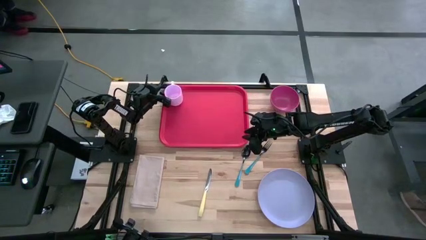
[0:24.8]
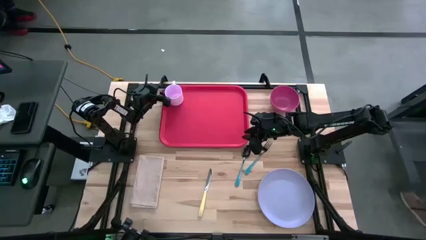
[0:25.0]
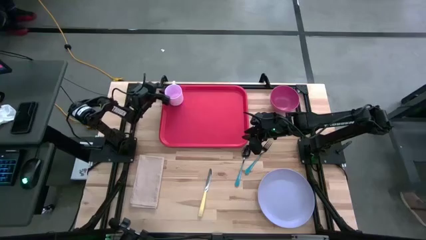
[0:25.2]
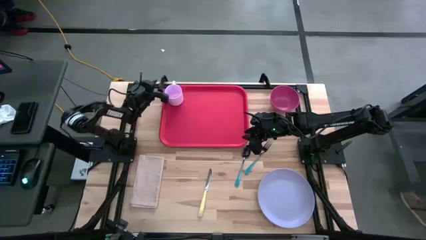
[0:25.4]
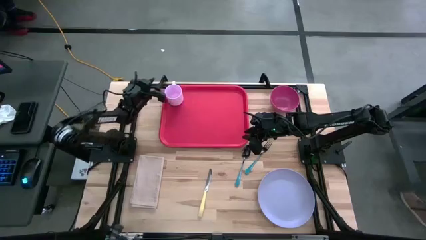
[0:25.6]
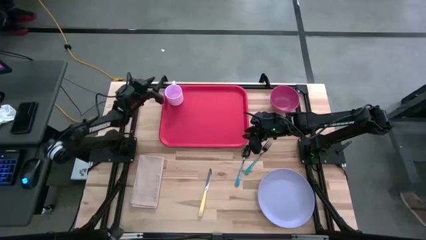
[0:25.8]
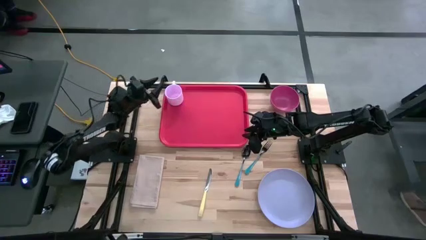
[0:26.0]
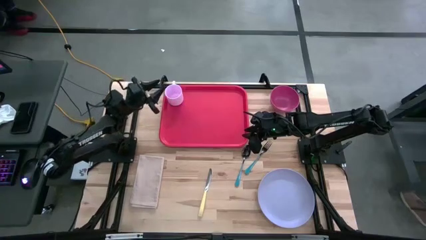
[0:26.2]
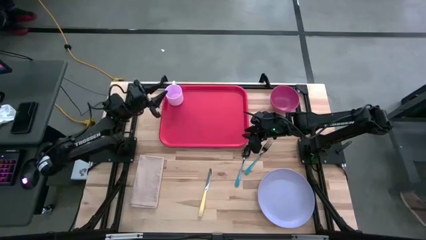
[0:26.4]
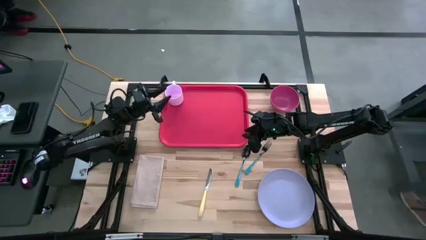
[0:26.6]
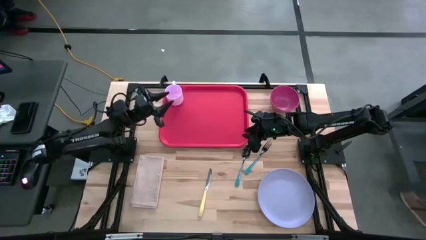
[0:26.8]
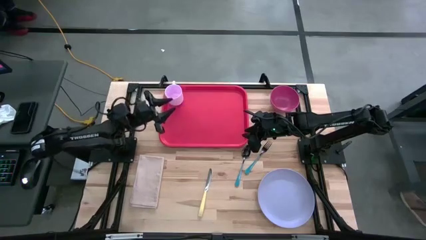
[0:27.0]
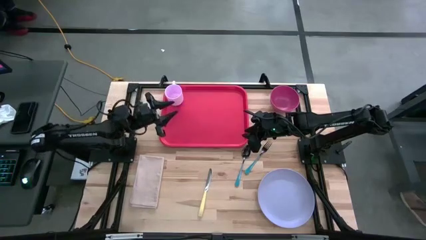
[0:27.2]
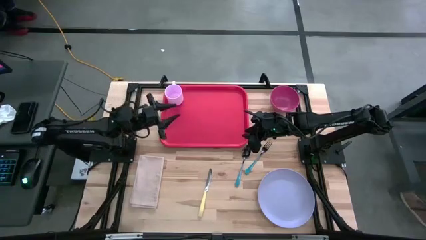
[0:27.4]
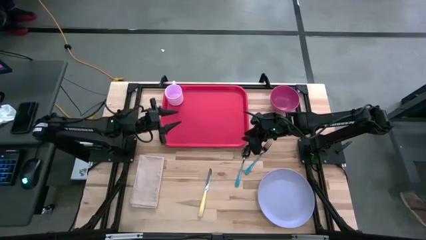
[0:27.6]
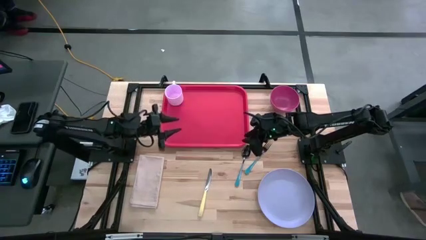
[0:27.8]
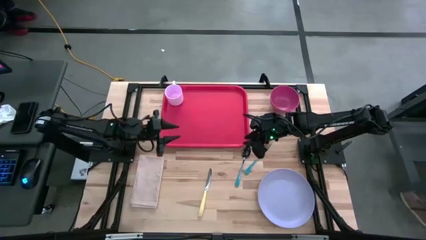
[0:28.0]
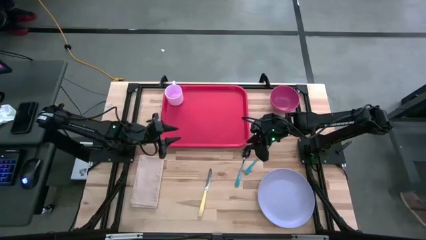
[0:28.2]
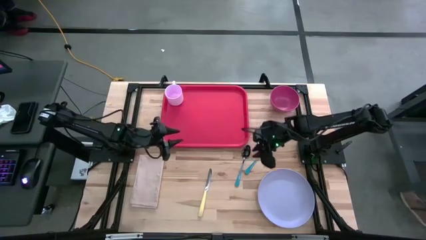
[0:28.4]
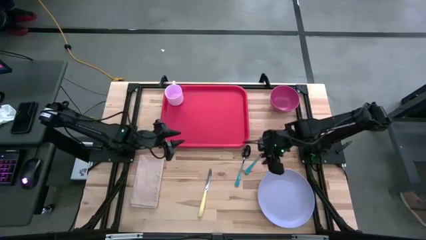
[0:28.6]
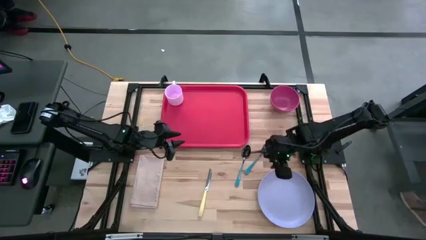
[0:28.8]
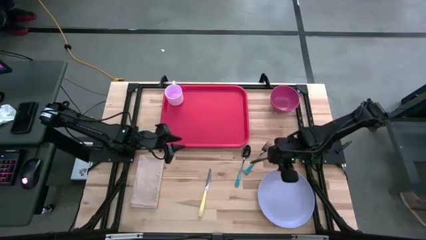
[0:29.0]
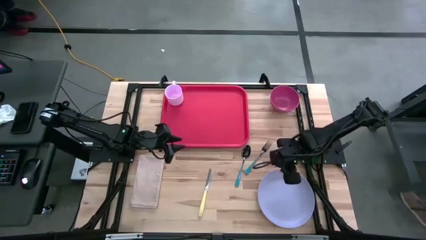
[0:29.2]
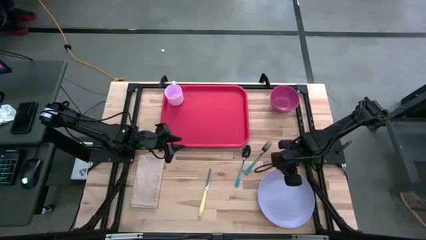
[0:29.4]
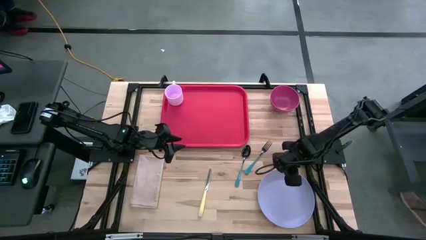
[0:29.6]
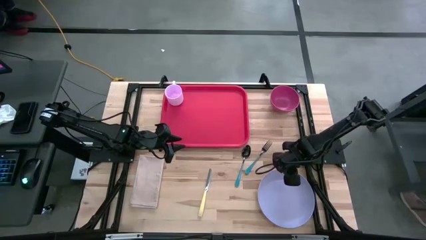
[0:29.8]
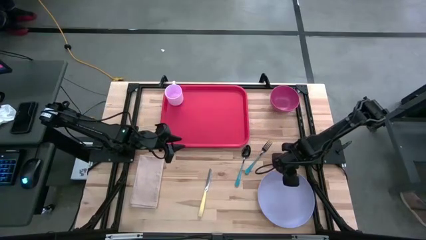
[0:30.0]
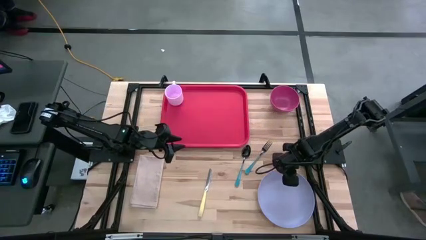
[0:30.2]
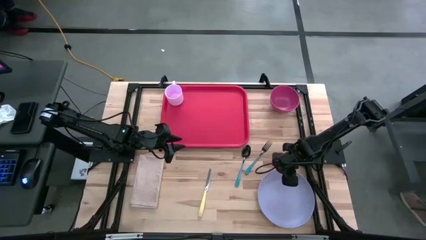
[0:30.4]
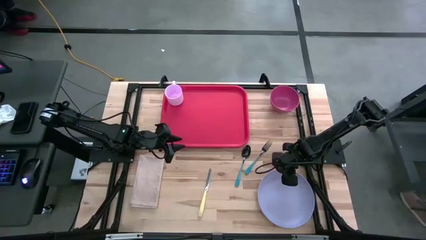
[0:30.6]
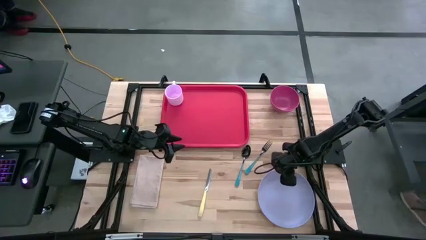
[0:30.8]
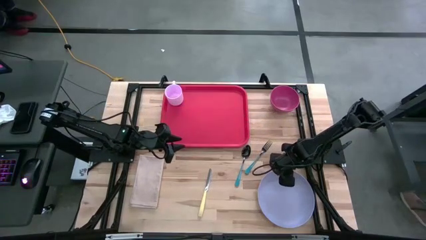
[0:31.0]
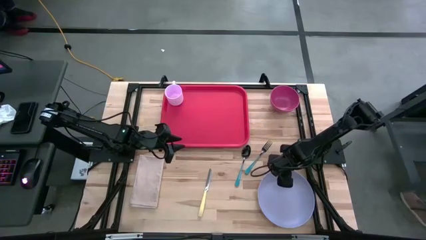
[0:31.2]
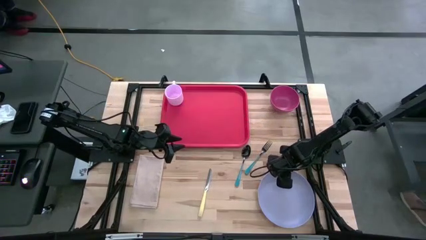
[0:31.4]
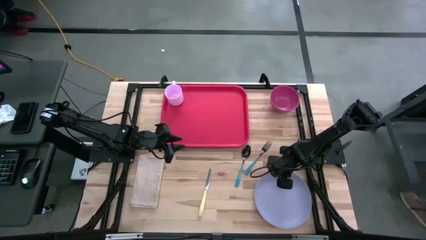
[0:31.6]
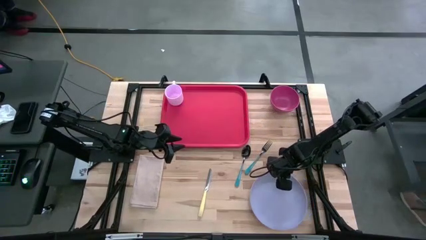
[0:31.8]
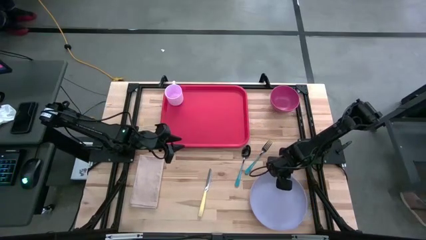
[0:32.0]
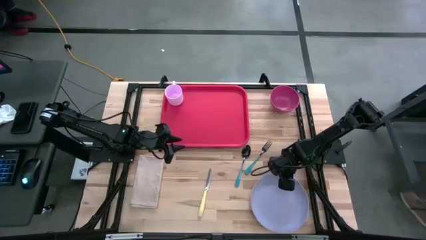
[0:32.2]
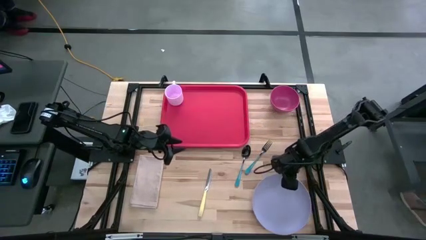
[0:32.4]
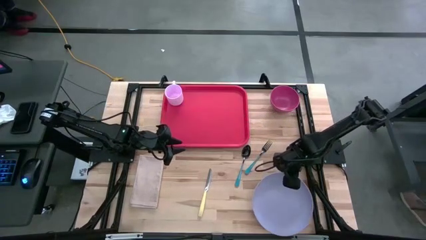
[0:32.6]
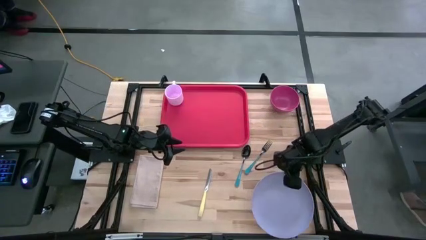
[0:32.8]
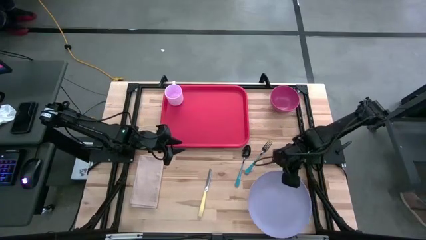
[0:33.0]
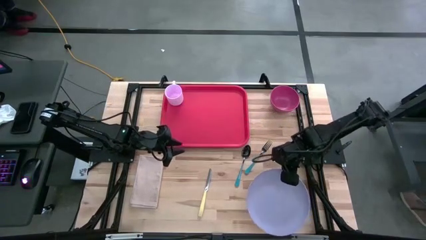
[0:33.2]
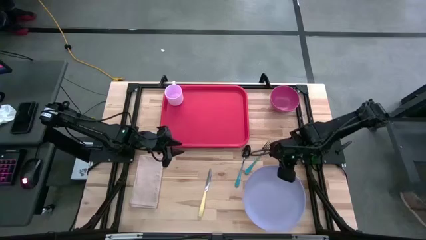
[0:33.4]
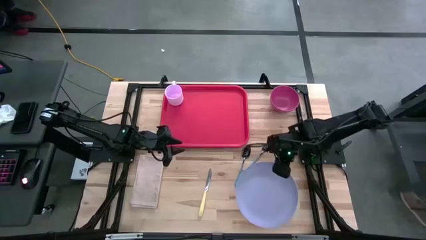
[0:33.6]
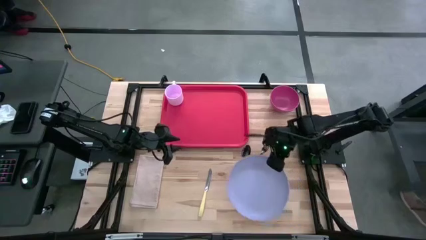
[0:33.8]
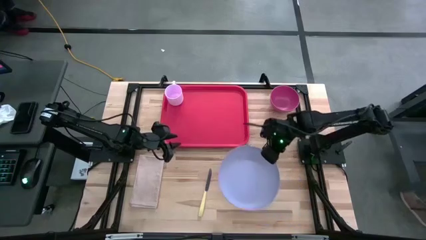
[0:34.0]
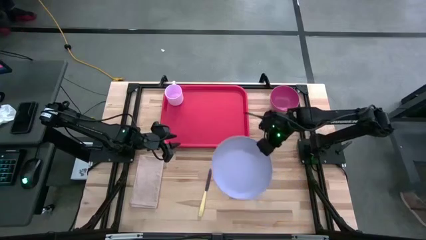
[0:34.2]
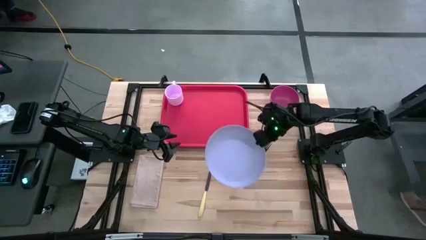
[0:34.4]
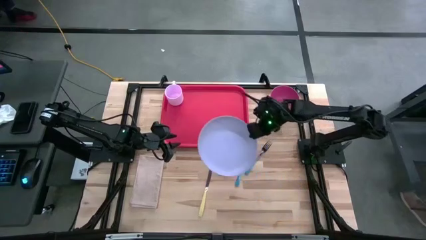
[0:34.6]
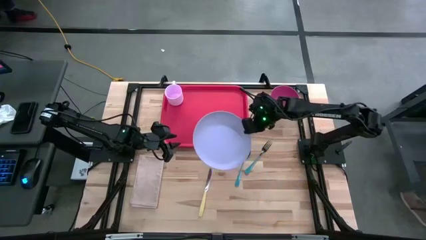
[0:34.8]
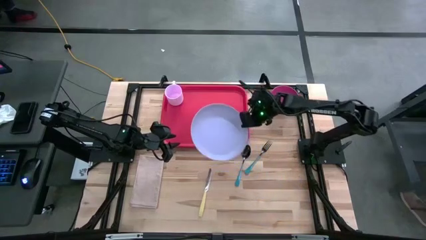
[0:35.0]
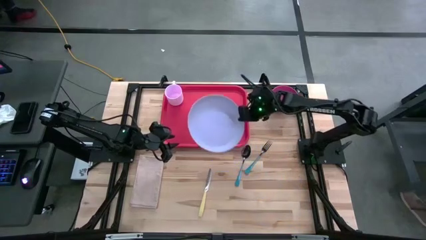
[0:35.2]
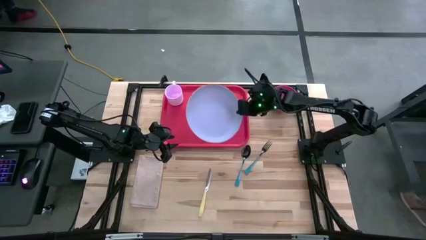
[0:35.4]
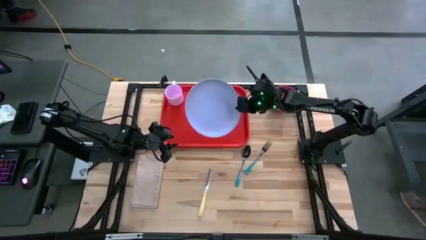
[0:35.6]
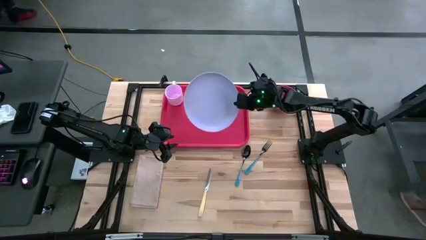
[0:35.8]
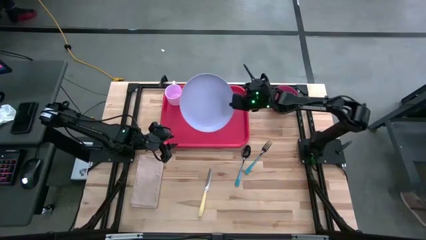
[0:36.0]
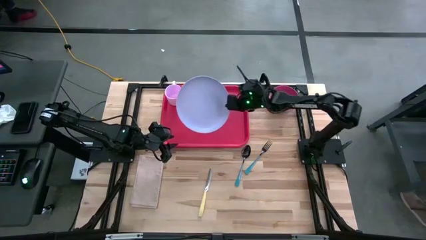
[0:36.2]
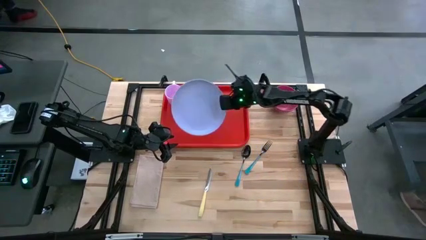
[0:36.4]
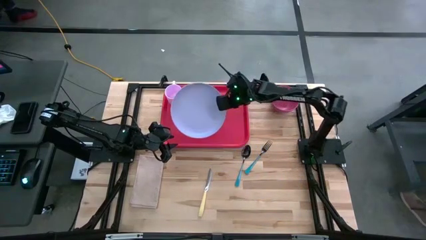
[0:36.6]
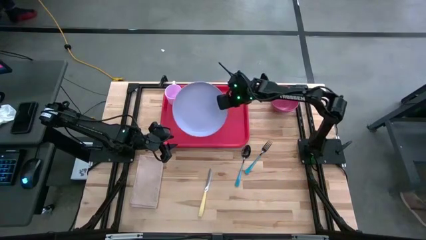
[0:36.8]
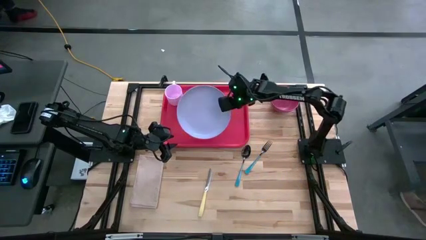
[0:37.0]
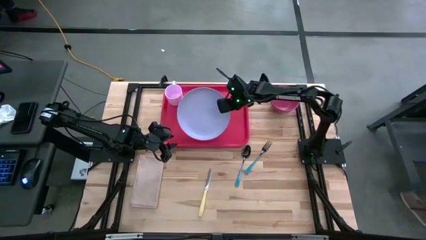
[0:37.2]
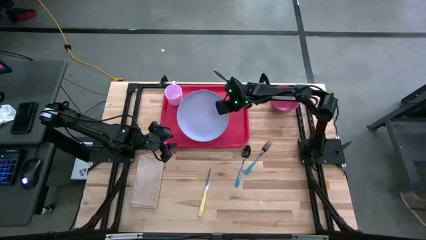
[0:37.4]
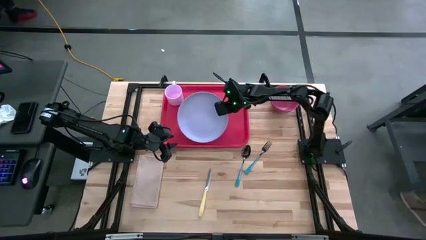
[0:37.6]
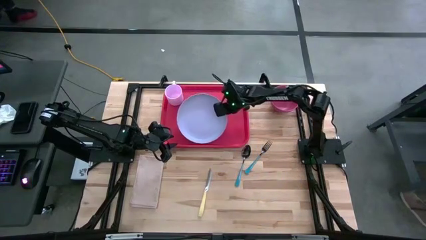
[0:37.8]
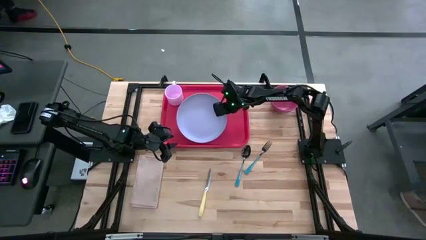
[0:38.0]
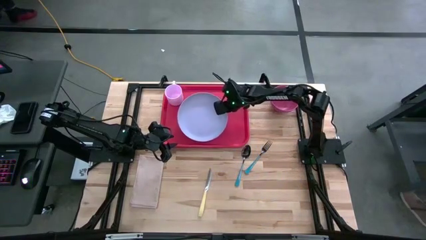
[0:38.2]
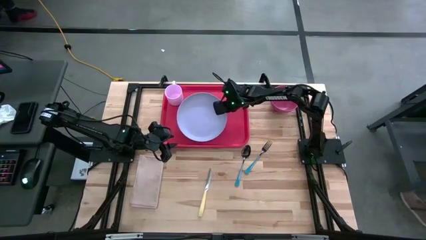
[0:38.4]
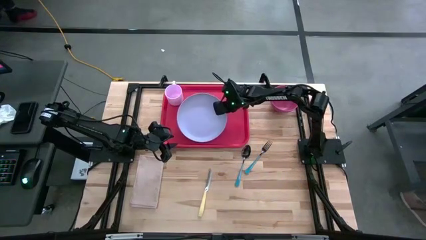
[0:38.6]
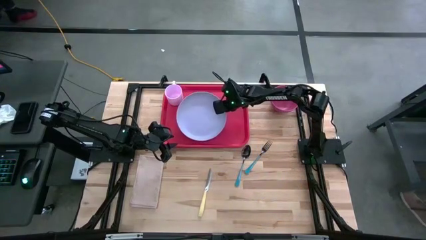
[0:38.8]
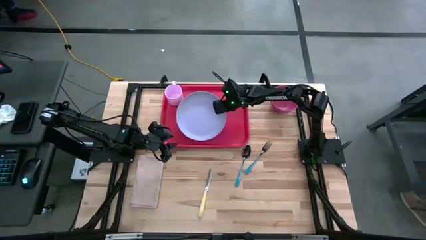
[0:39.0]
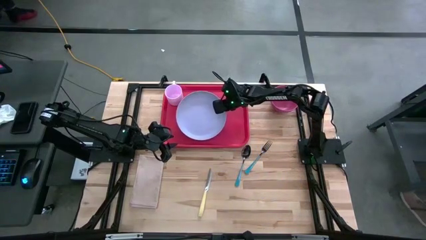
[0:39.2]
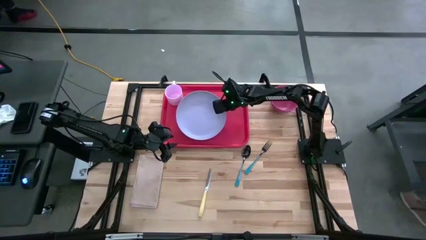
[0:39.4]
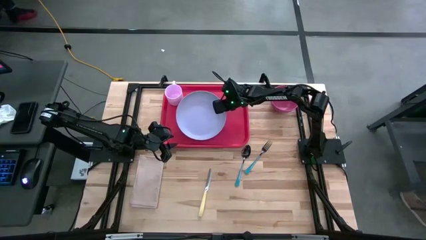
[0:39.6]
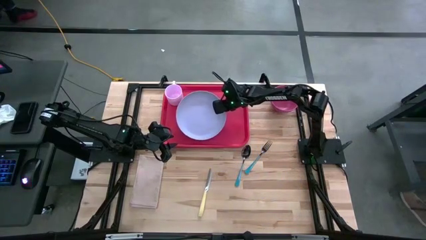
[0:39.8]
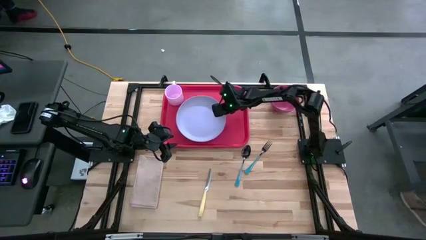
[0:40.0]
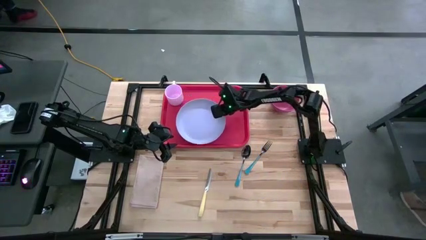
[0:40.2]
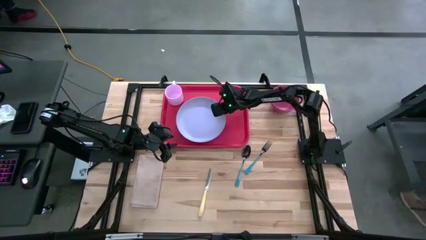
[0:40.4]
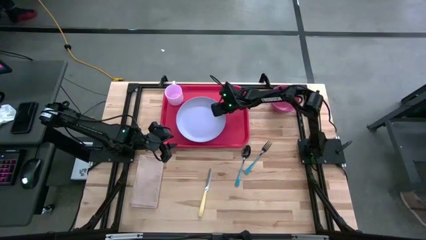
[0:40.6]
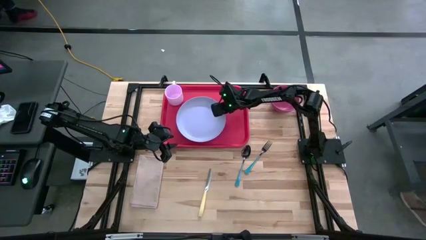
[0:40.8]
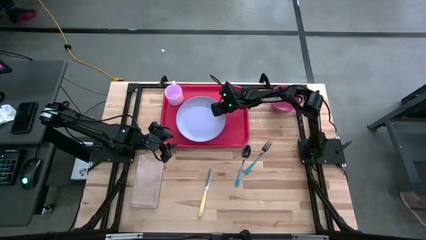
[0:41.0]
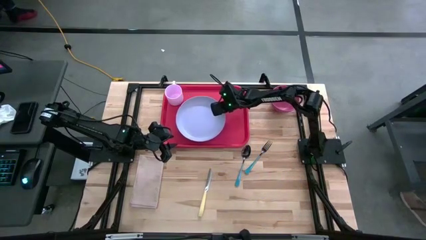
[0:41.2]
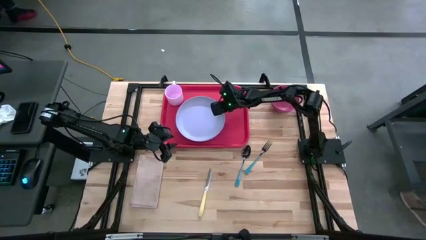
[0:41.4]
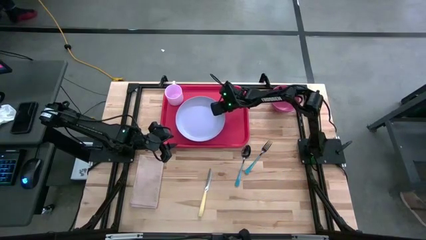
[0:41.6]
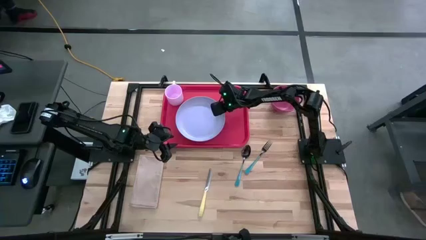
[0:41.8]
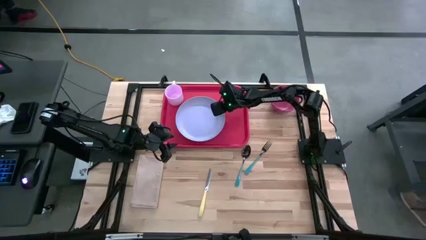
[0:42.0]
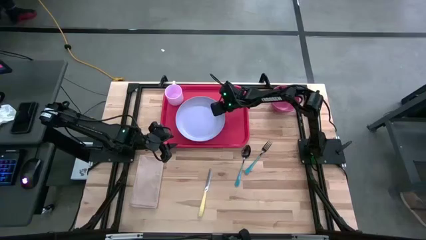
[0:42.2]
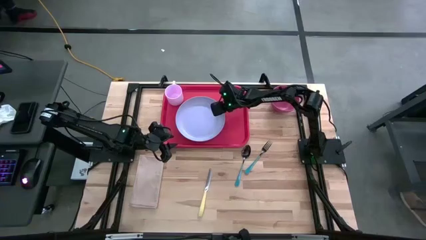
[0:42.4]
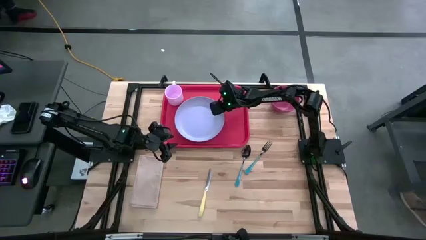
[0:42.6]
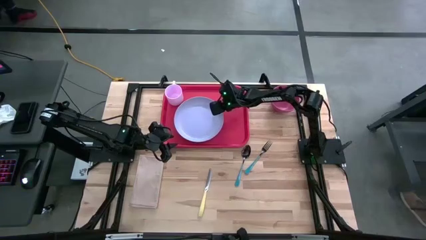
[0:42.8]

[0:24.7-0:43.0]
Task: Set up tray
Put the white plate on the red serving tray
